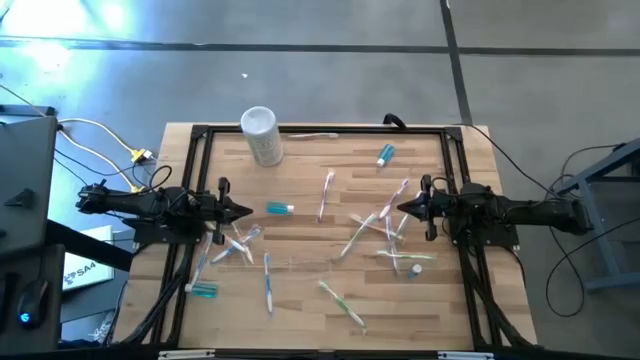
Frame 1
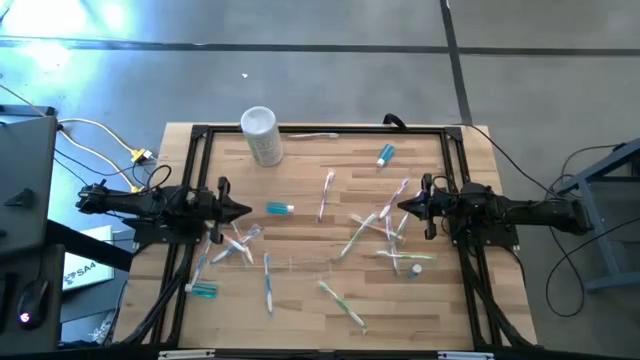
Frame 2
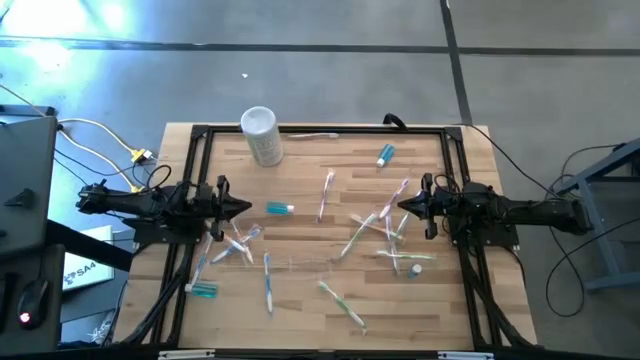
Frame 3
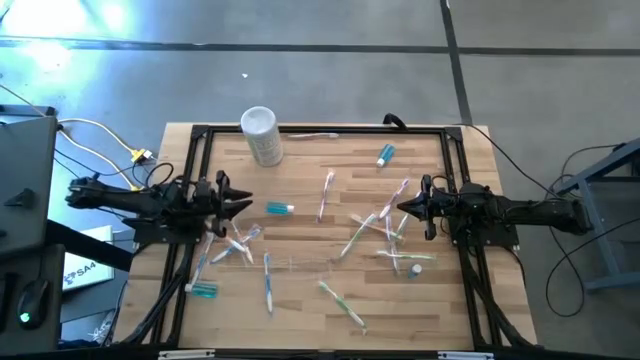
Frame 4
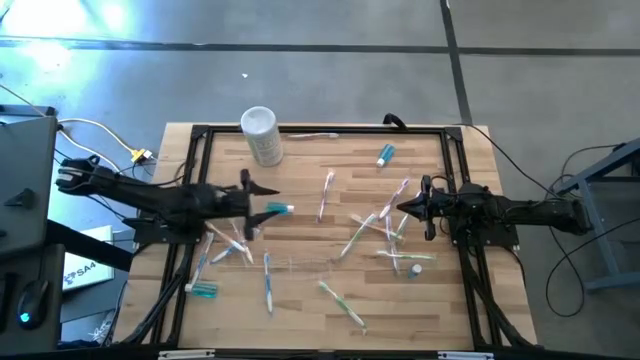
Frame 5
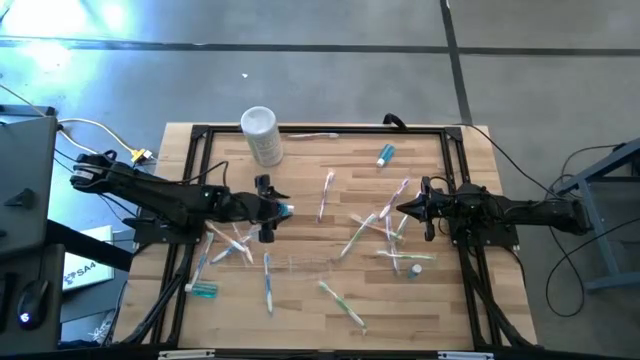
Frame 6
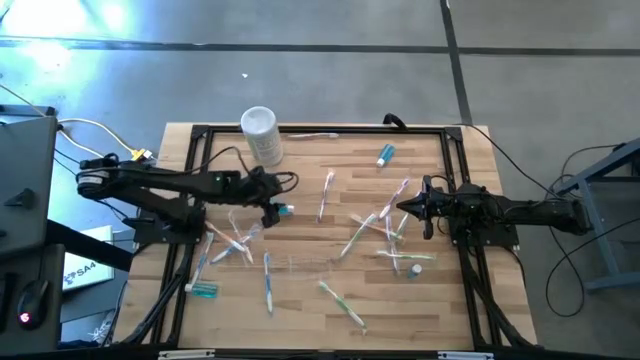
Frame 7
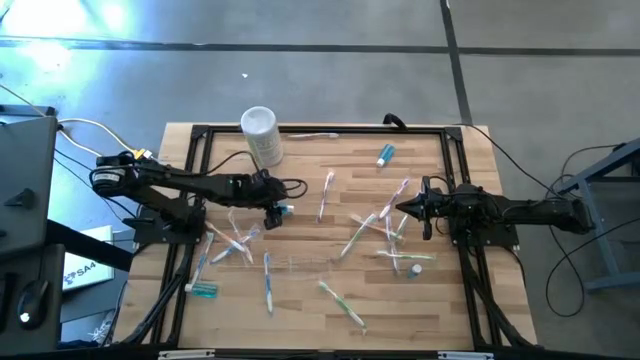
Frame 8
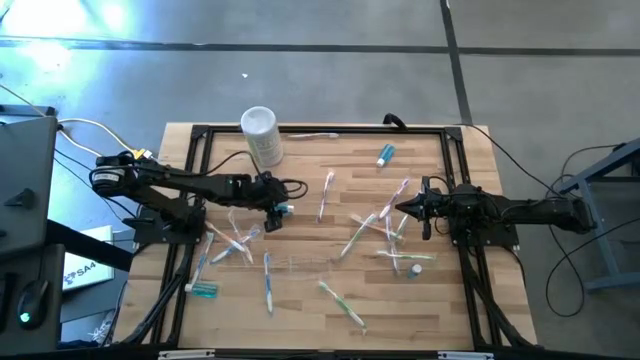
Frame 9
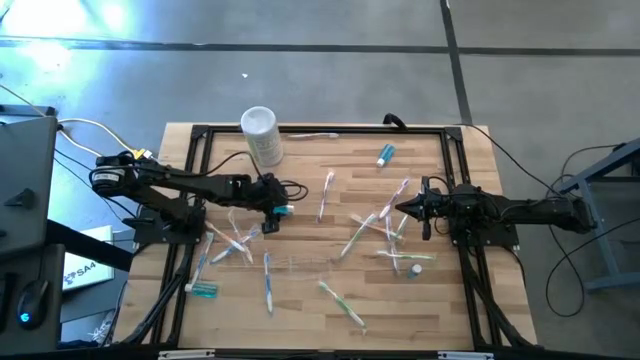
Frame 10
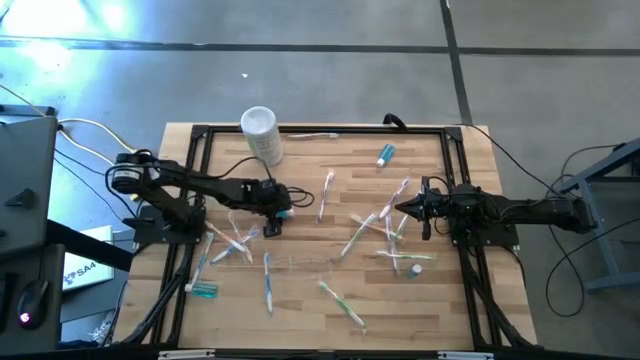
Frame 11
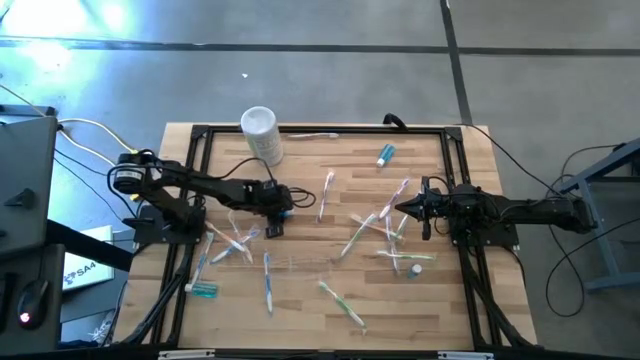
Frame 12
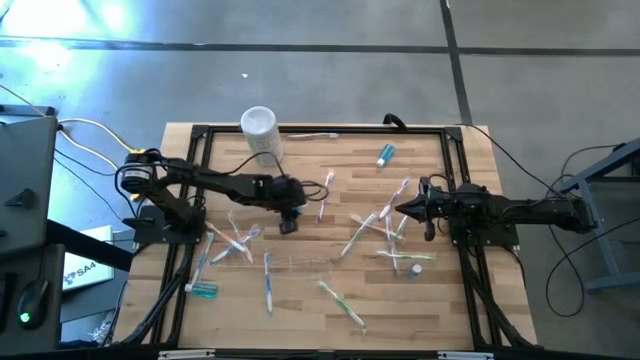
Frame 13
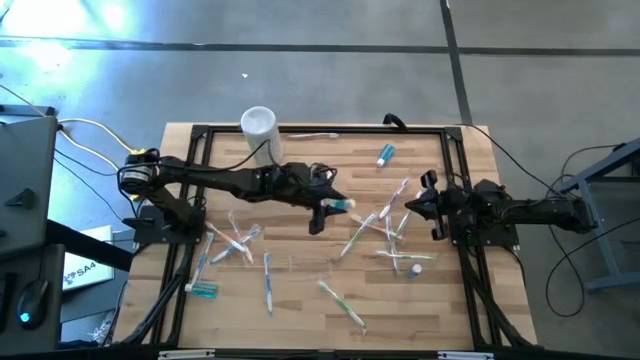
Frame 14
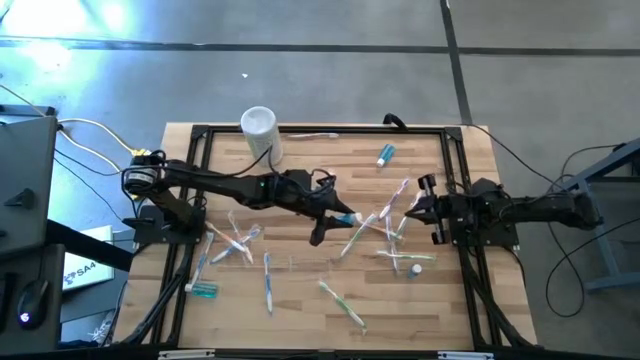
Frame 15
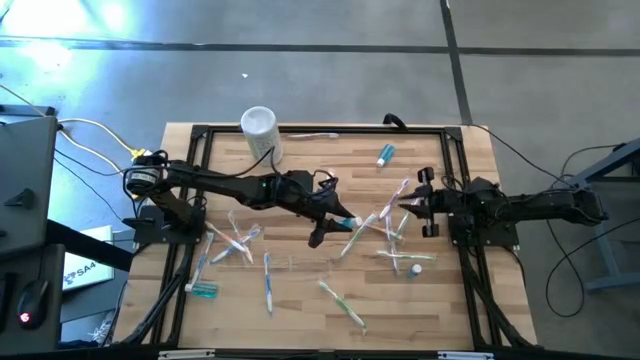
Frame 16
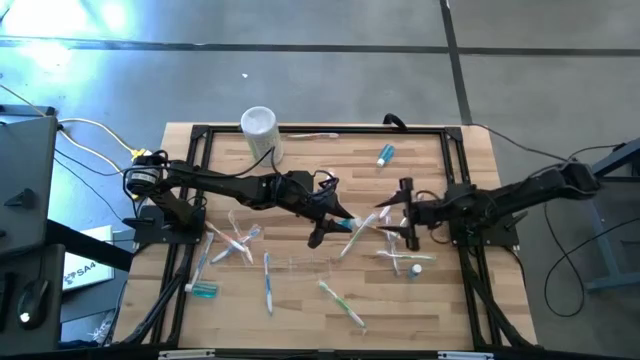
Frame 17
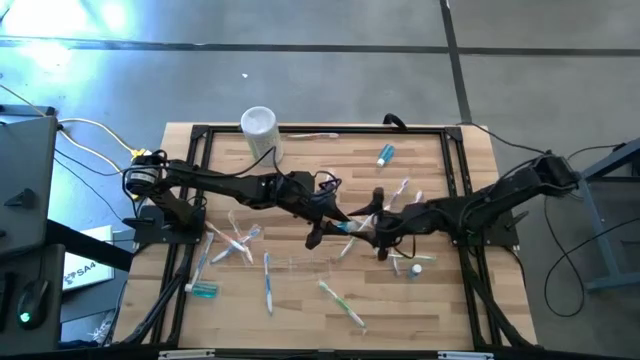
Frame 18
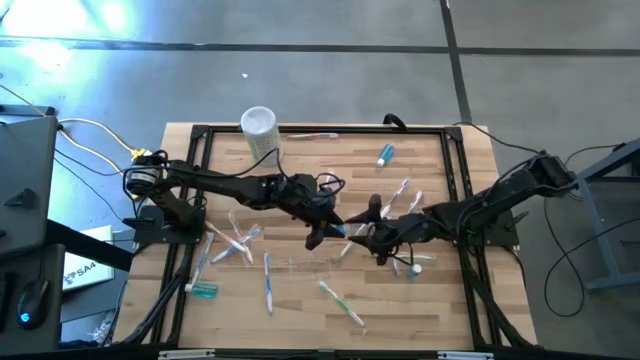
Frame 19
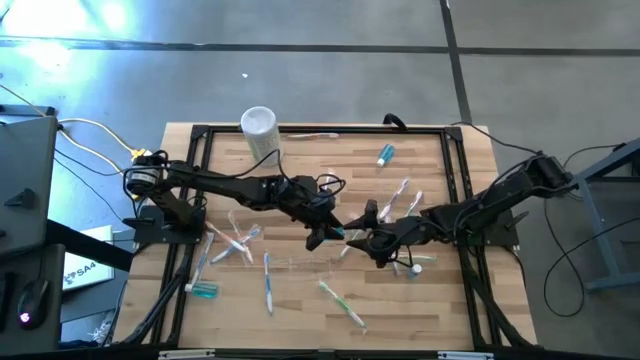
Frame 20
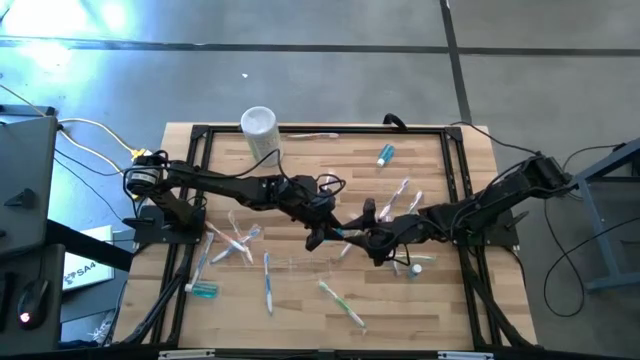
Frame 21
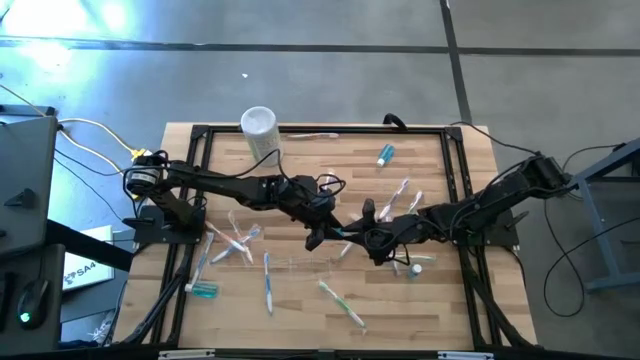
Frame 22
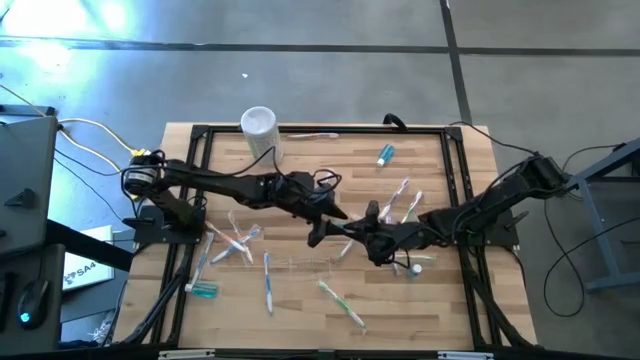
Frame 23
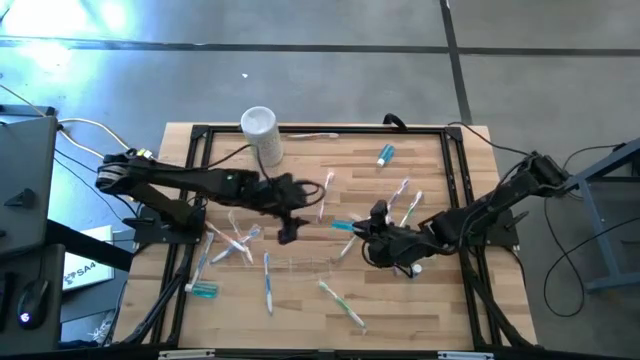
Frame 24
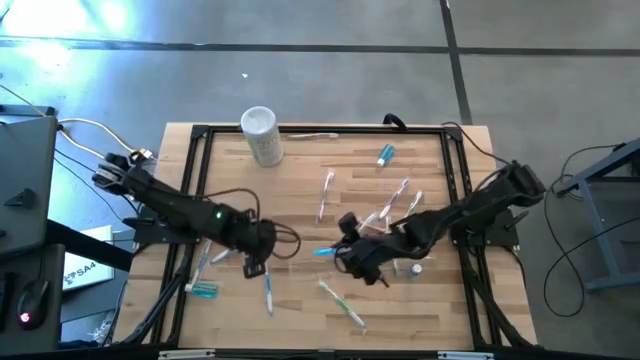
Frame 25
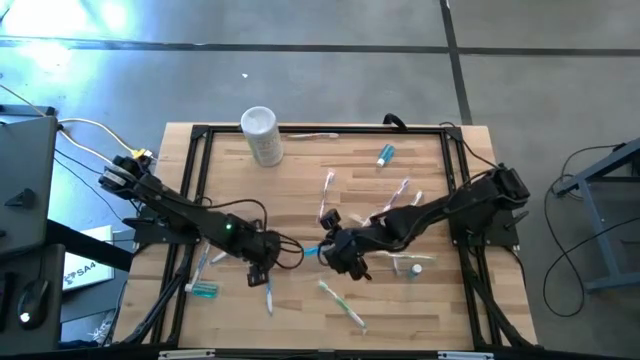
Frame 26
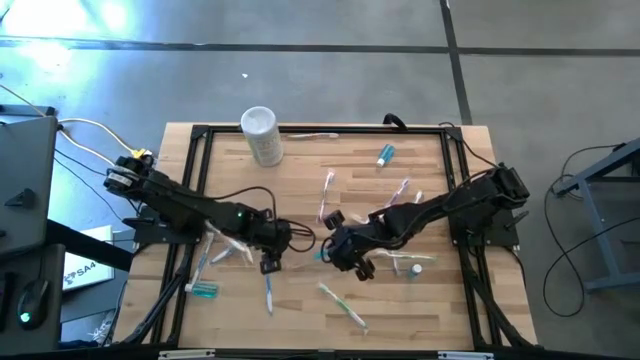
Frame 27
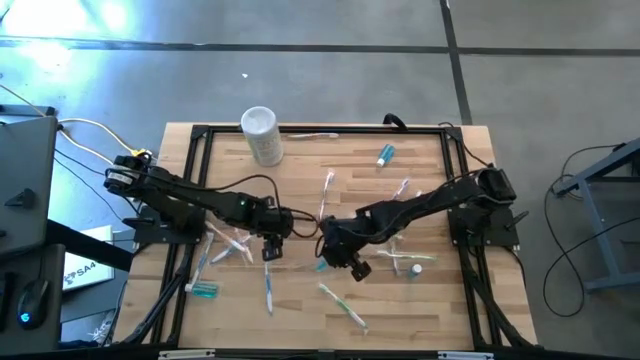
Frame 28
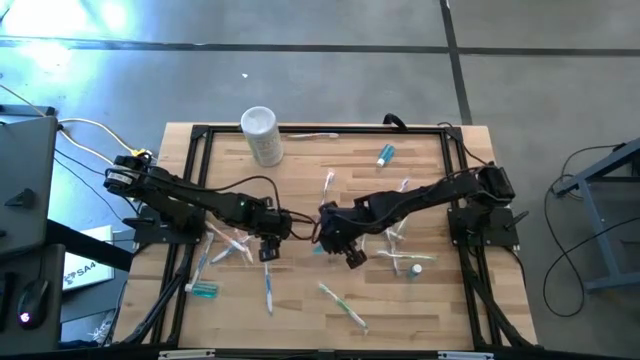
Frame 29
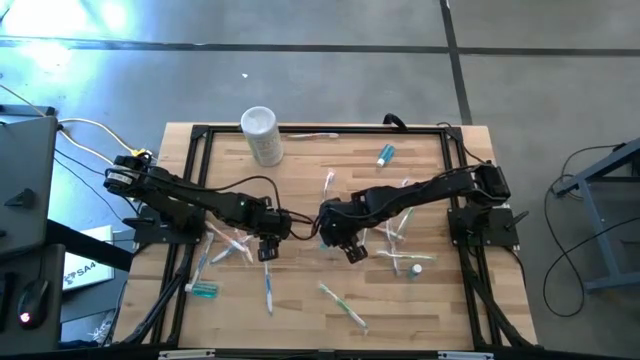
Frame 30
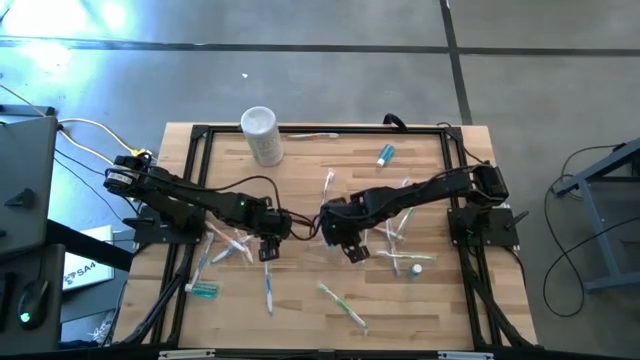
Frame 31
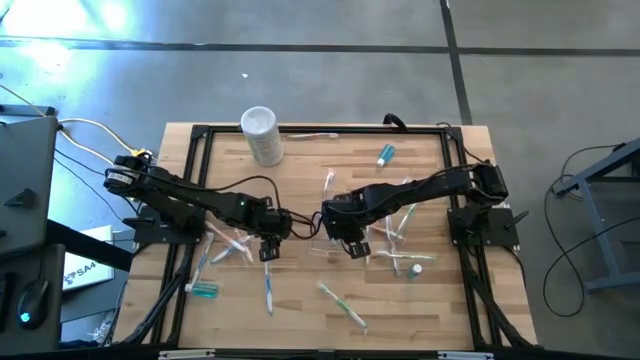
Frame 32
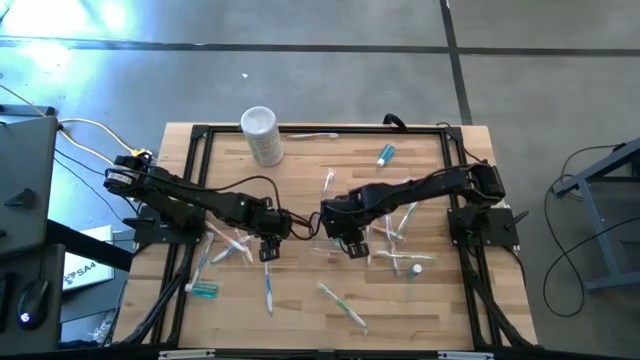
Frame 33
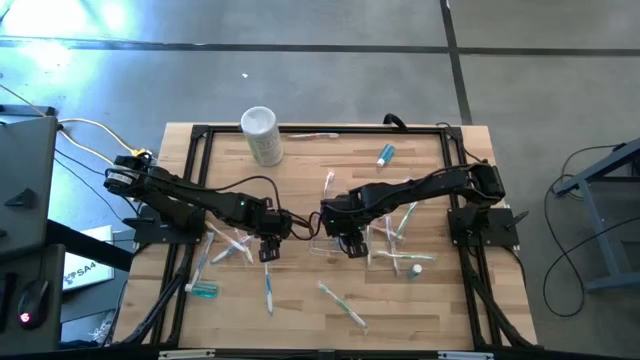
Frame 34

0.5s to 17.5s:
Task: Pick & Place toothbrushing station
Put the blue mouthwash into the middle section of the transparent organizer
